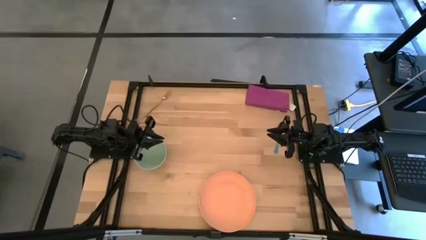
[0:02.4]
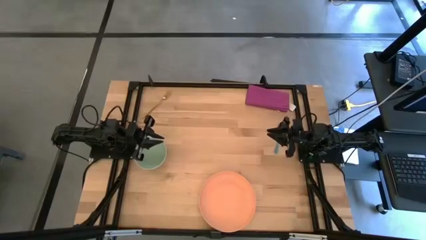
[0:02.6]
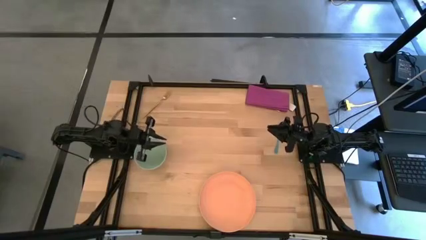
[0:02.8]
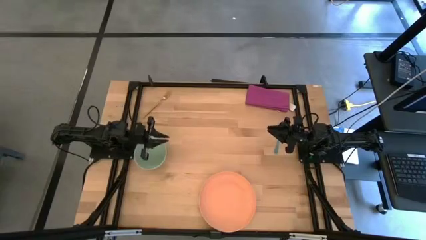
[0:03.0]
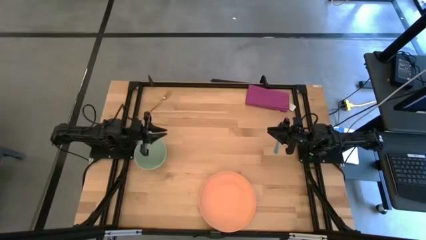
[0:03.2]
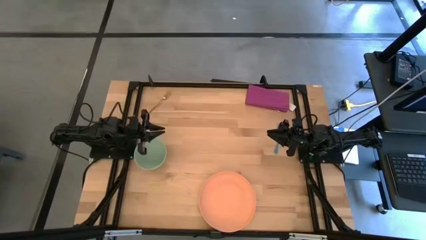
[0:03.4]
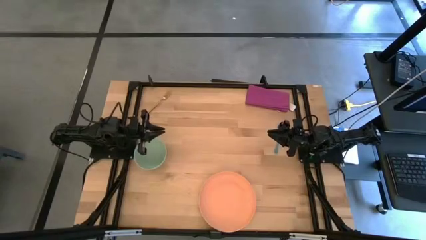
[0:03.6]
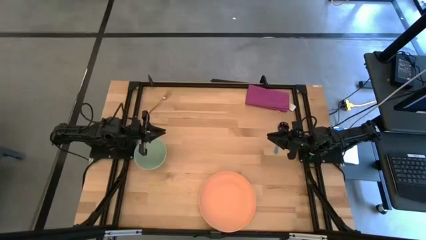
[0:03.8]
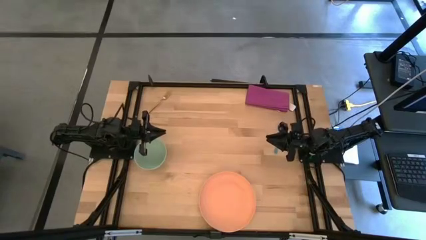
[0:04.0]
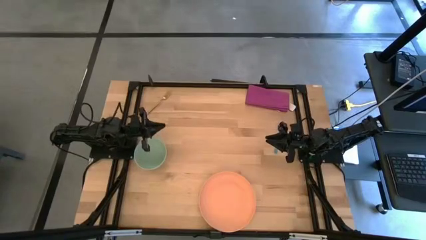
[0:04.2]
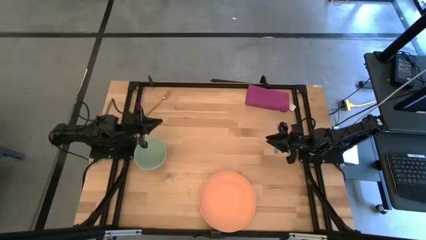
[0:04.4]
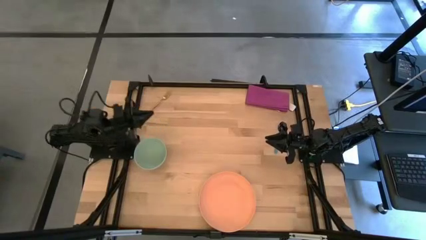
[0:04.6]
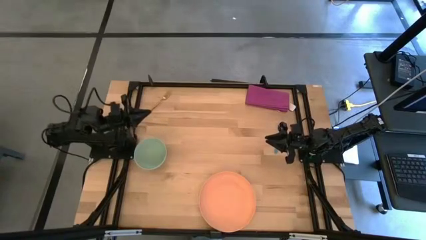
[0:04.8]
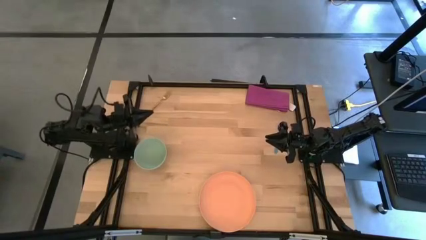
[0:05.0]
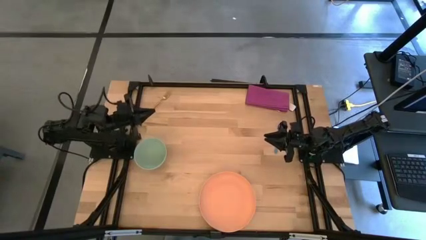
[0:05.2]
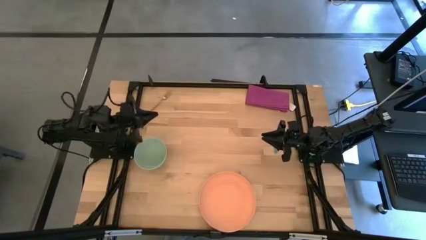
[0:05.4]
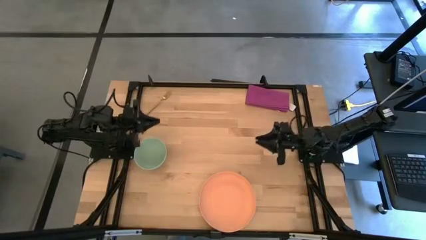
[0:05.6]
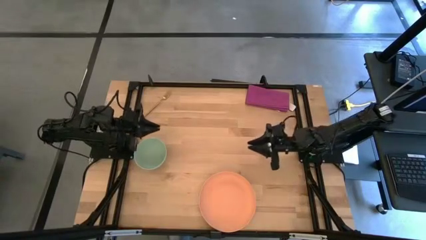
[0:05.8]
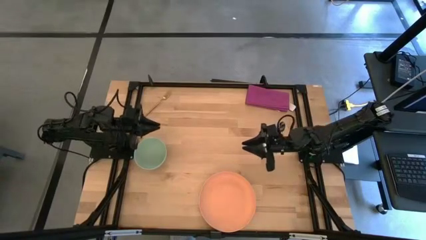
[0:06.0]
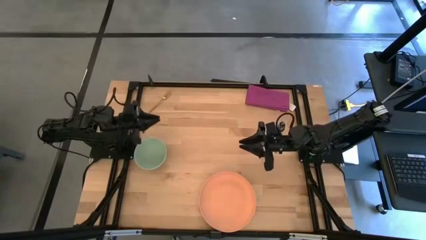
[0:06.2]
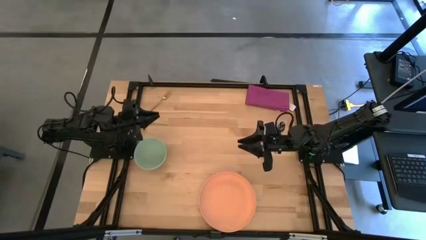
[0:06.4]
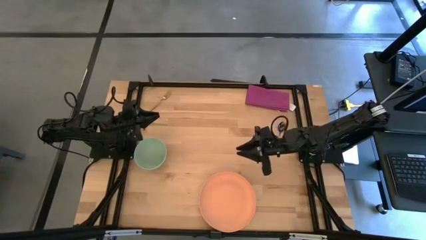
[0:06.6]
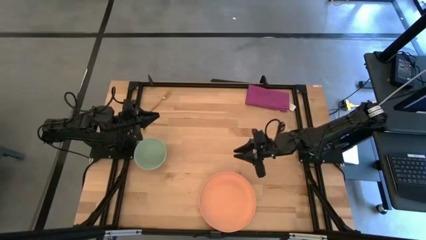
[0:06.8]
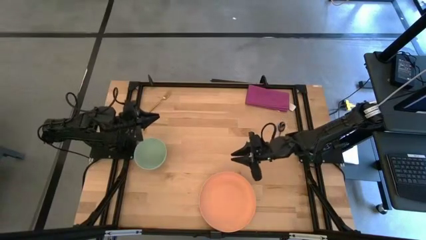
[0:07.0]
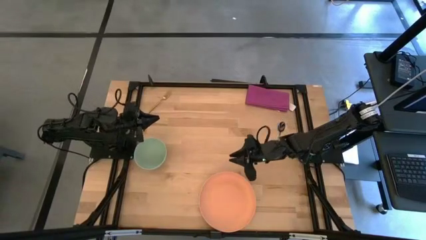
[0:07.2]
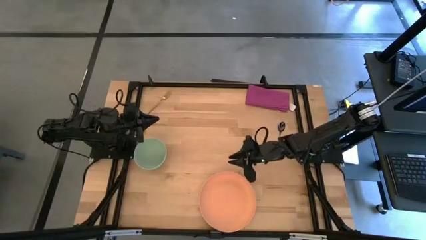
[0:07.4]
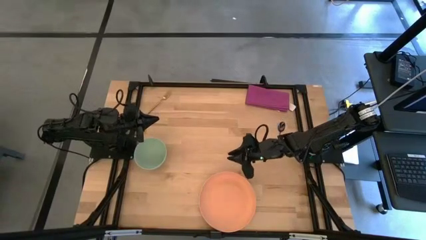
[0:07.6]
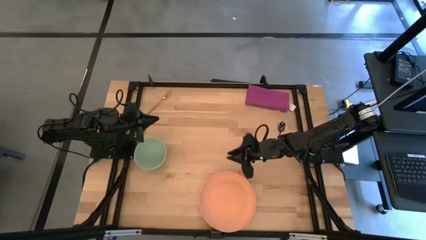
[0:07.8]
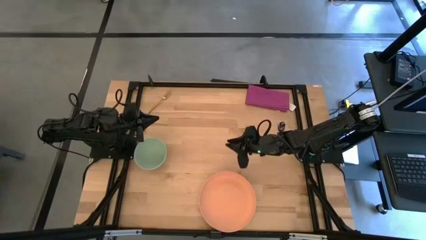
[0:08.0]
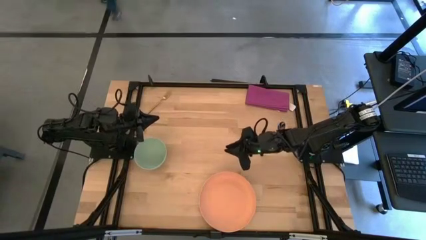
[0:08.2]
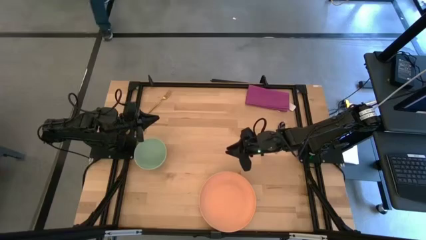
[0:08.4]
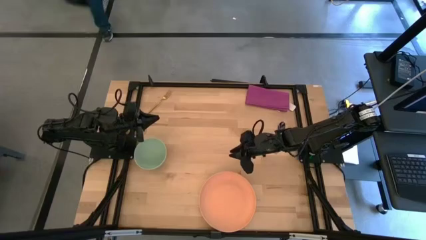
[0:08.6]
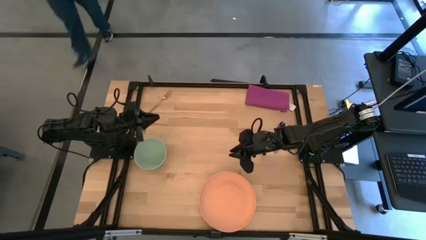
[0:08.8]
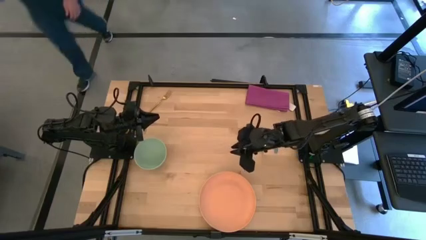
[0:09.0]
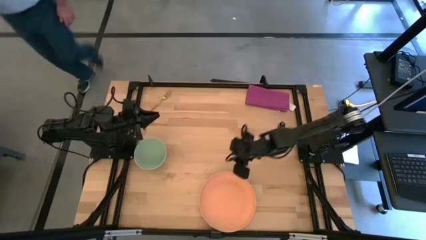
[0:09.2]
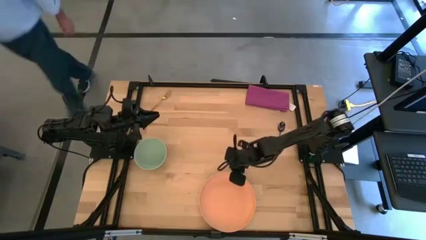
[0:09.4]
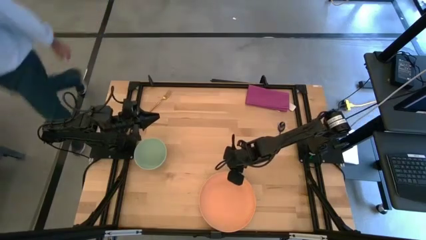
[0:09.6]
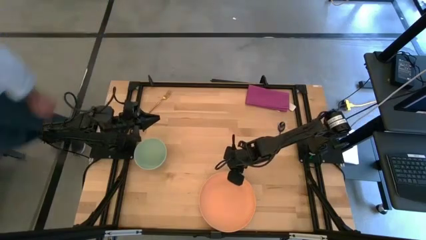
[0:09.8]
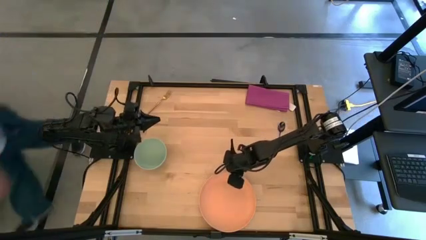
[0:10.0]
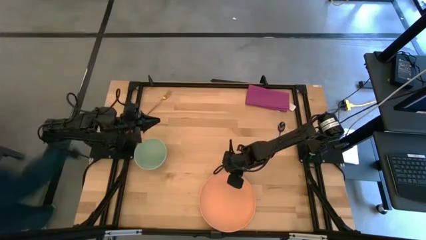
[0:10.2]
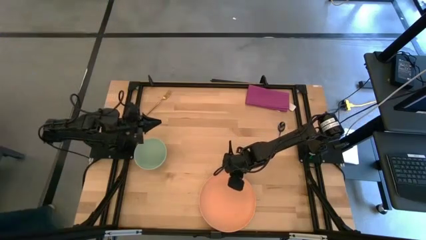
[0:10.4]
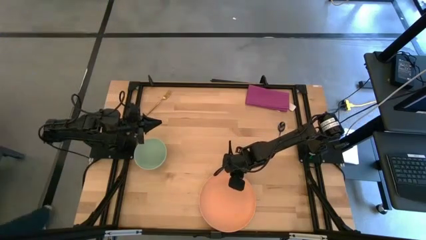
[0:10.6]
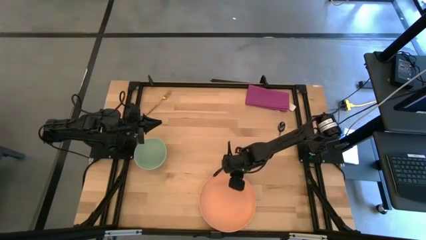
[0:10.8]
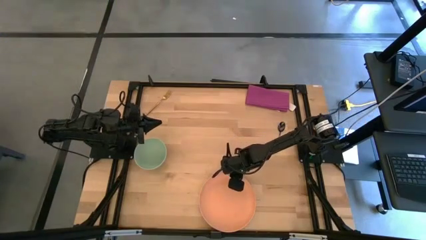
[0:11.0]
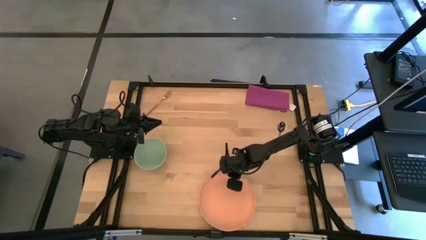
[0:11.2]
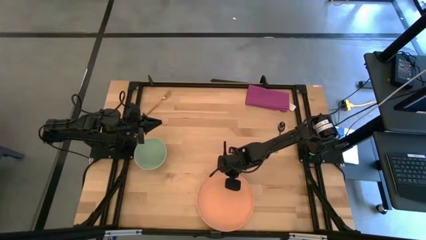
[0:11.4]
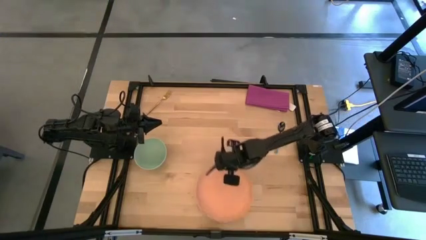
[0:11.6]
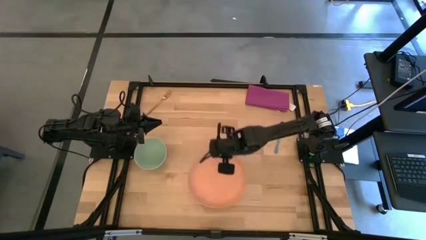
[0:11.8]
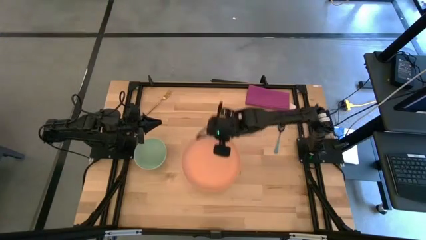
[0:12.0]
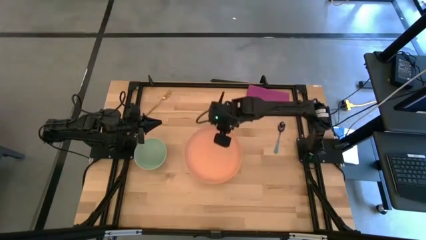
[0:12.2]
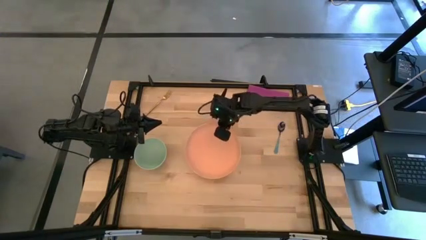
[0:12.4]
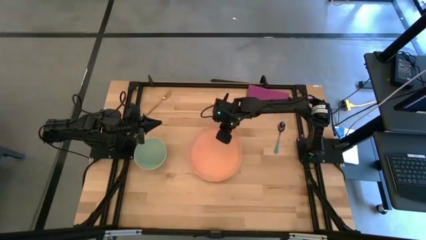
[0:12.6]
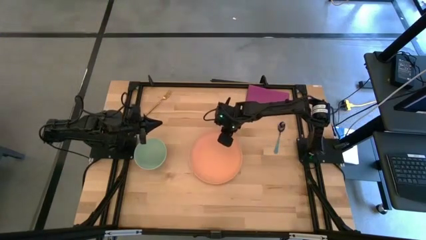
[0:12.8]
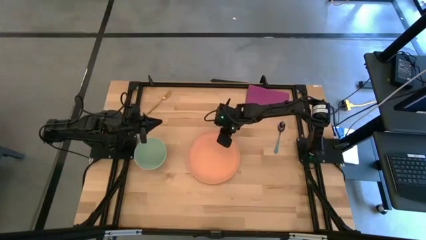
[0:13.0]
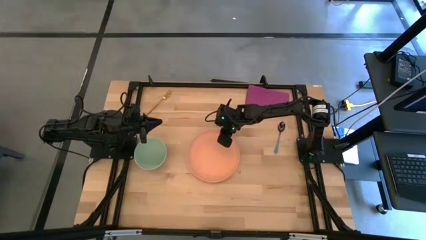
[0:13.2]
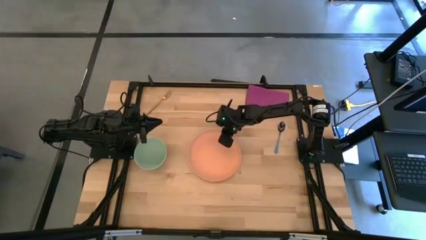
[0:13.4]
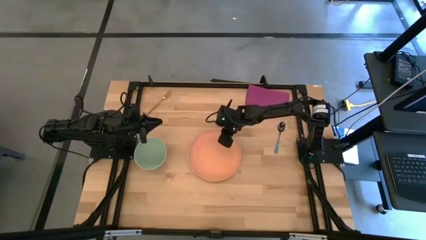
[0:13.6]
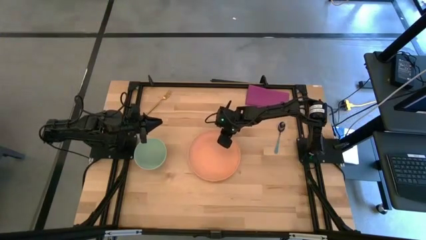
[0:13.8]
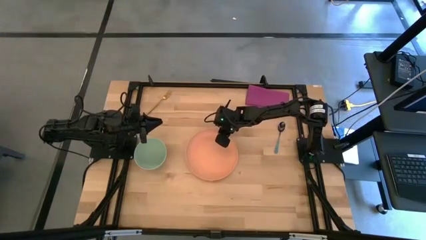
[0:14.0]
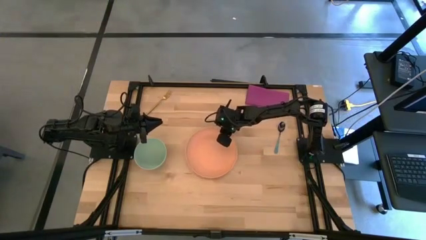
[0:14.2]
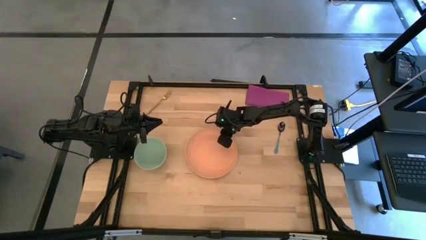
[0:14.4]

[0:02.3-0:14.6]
Task: Set table place
Put the light orange plate to the center of the table
